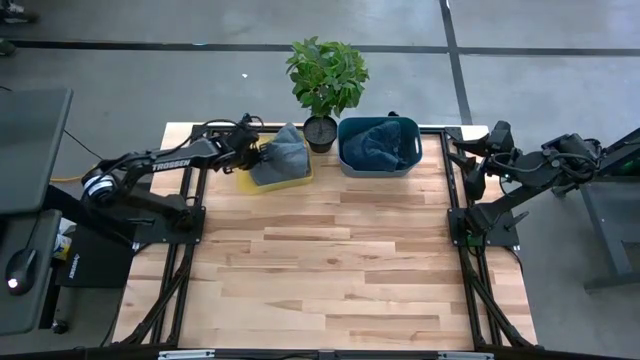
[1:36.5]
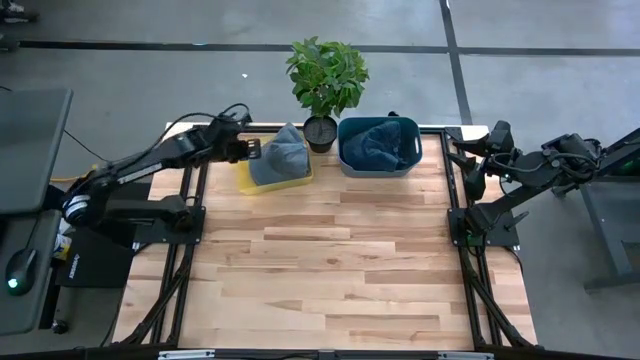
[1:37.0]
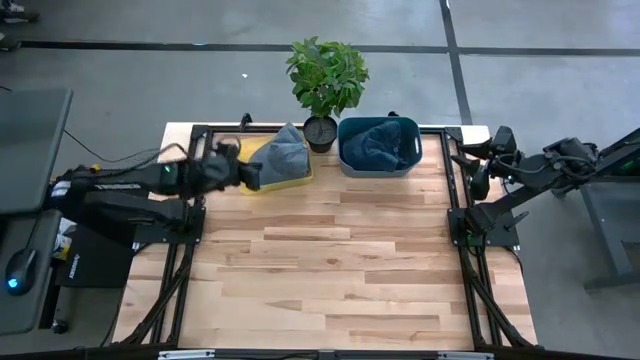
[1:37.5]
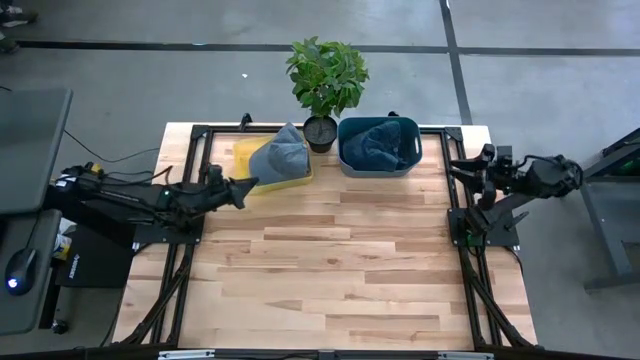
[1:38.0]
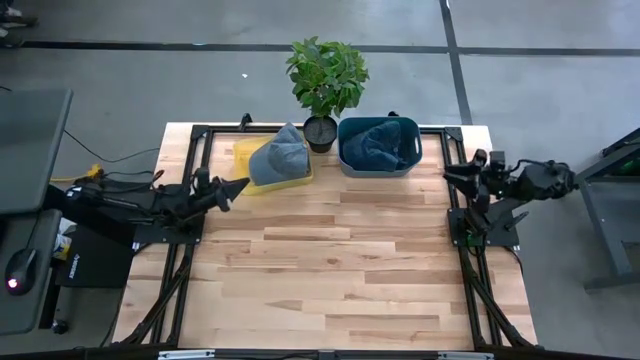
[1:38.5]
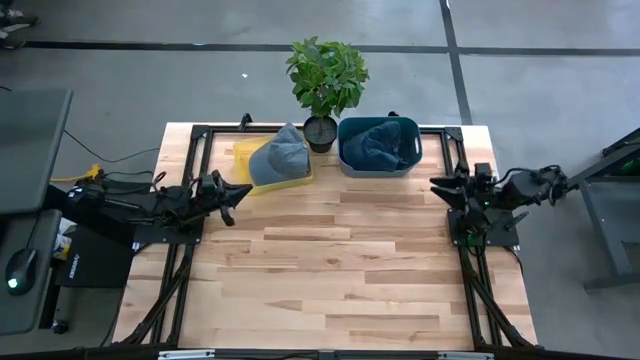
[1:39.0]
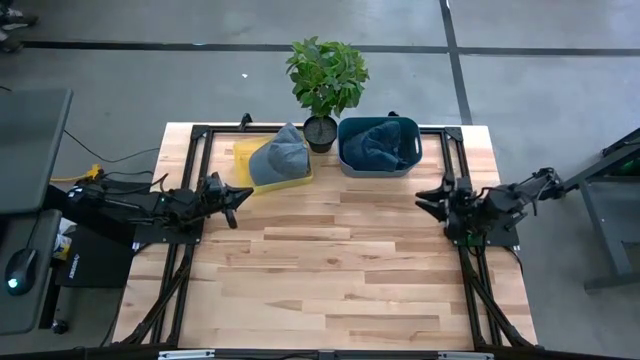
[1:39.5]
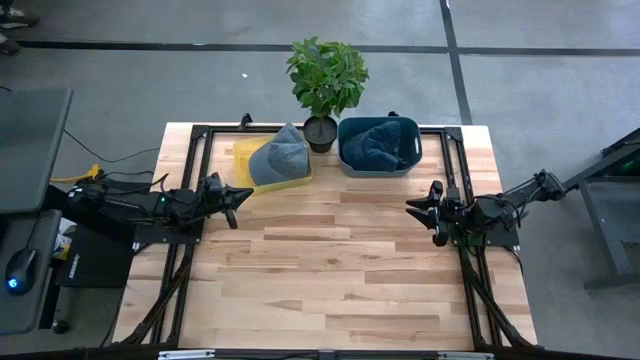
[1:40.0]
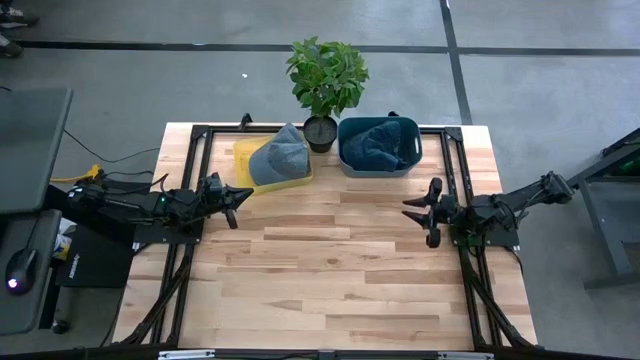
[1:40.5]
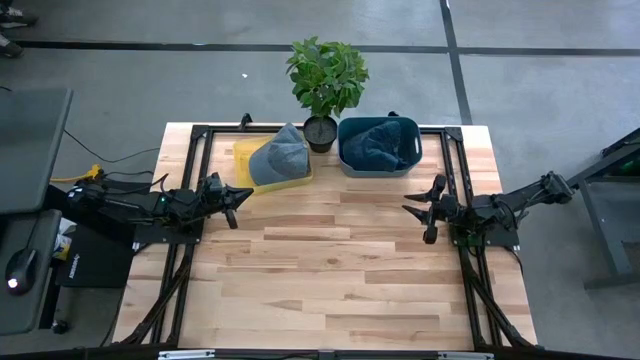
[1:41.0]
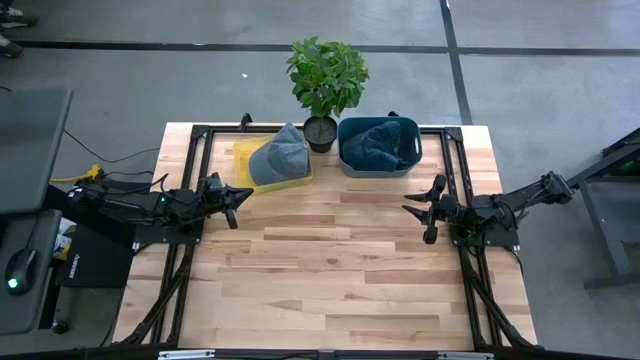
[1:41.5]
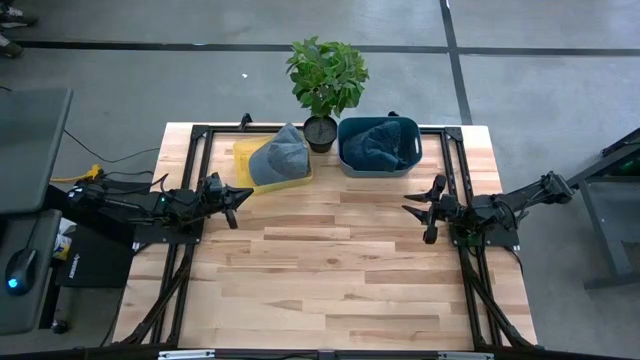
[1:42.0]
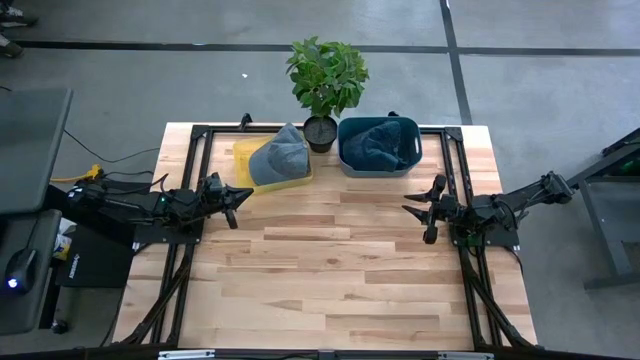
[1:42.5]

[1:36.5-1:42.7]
Task: Pick & Place hat
Return to Home Position

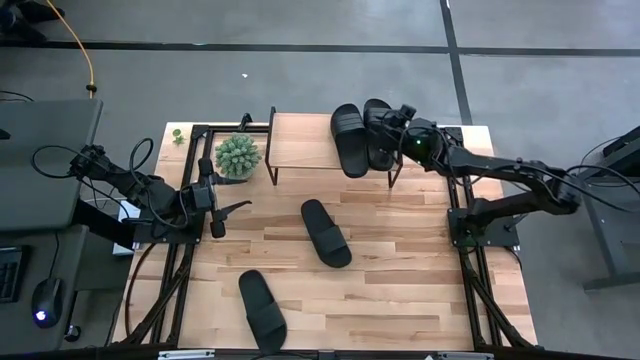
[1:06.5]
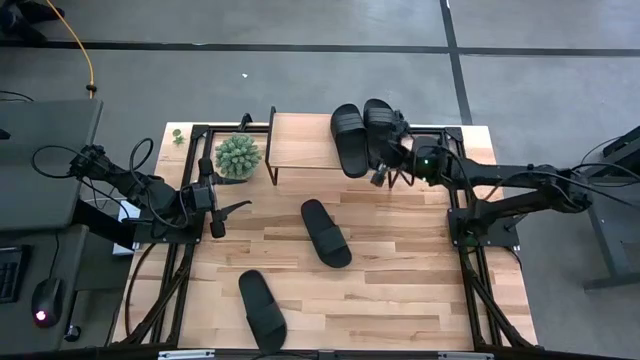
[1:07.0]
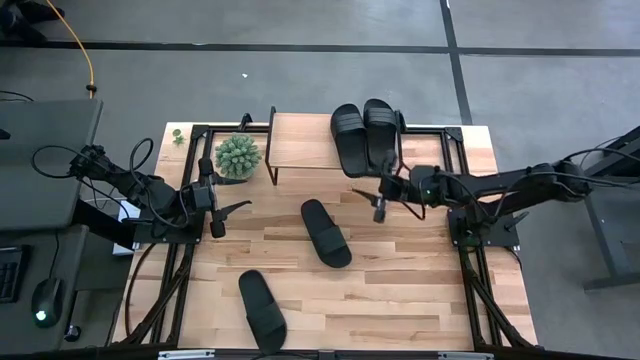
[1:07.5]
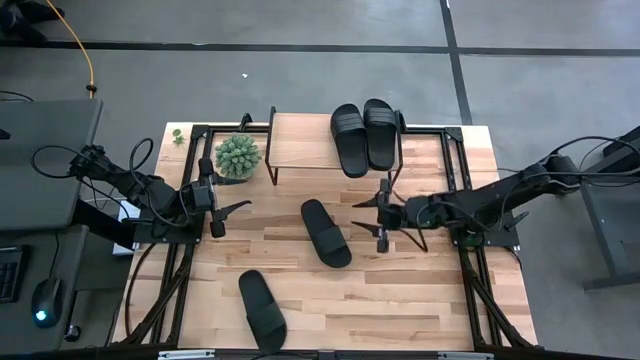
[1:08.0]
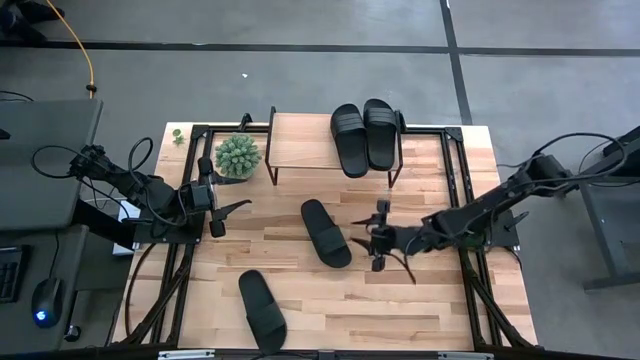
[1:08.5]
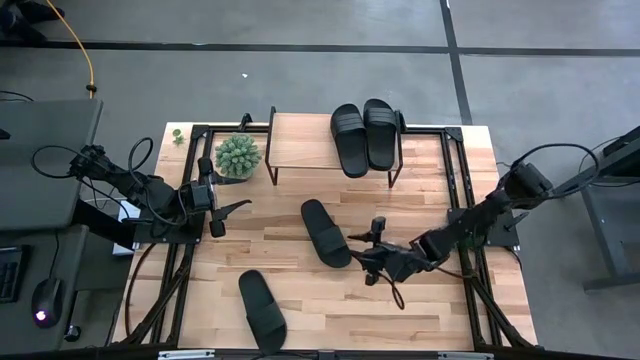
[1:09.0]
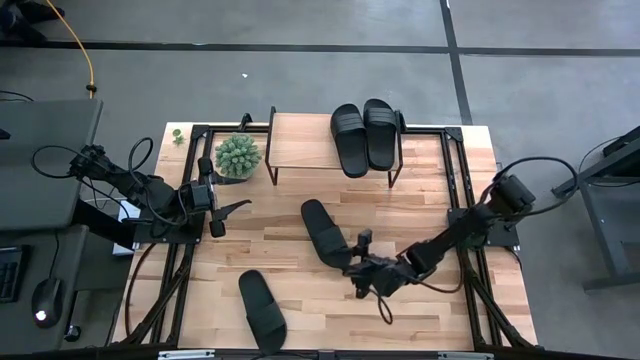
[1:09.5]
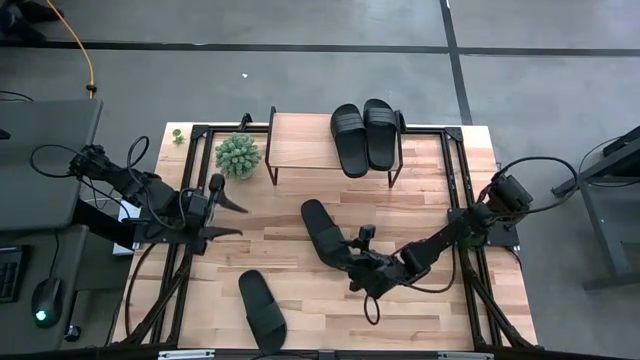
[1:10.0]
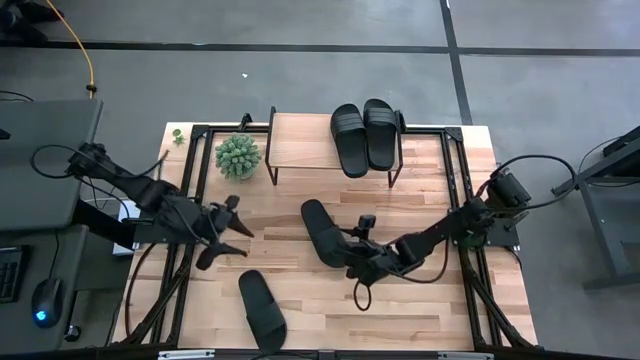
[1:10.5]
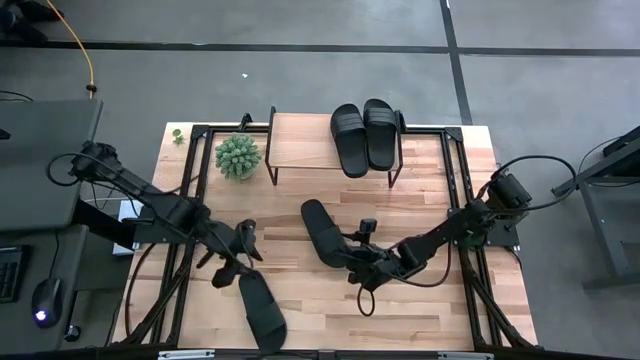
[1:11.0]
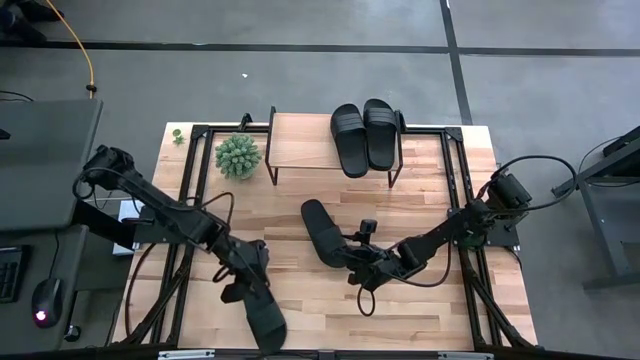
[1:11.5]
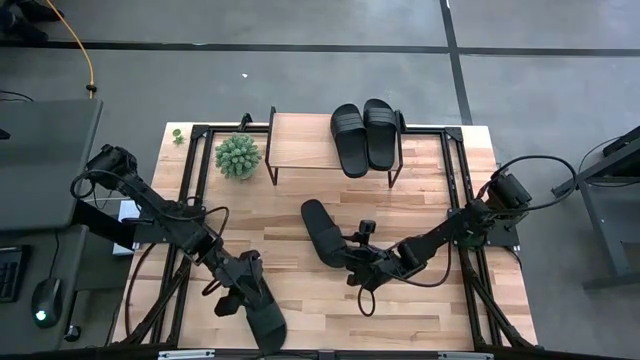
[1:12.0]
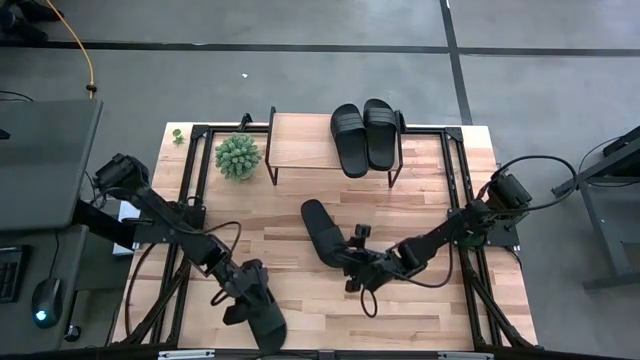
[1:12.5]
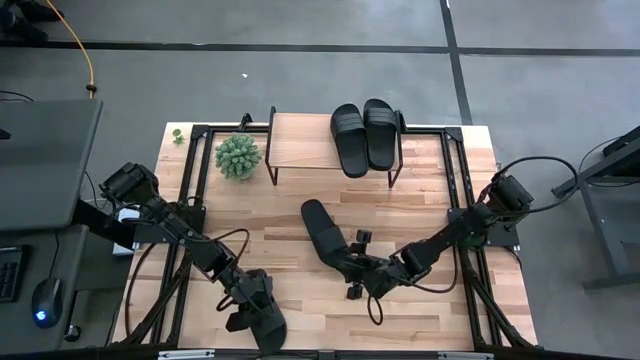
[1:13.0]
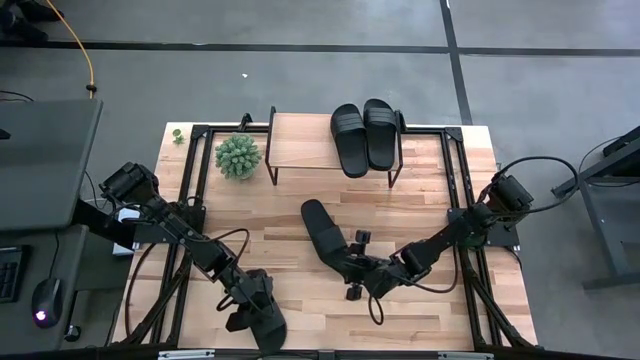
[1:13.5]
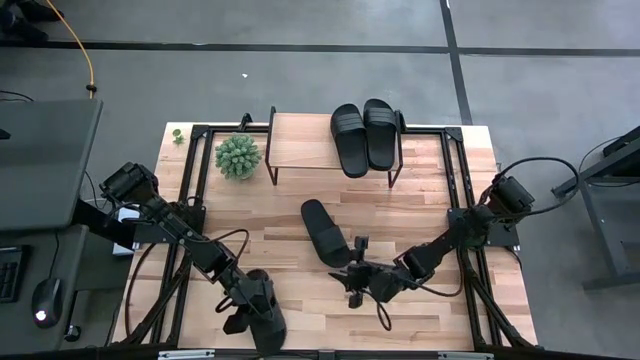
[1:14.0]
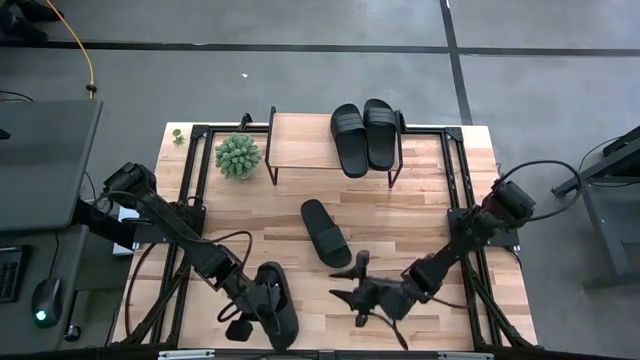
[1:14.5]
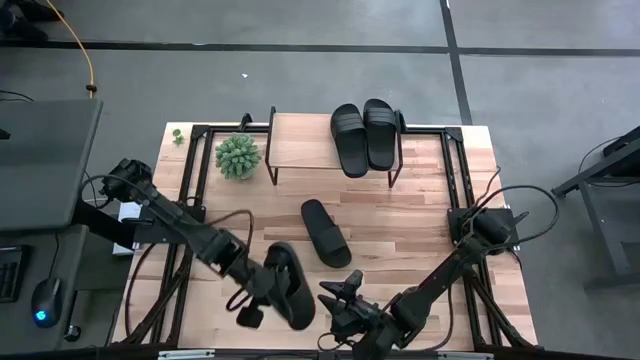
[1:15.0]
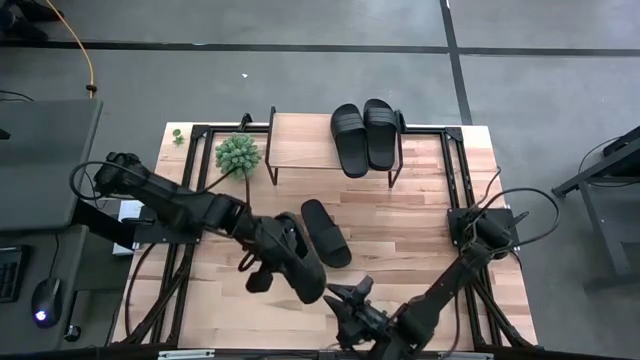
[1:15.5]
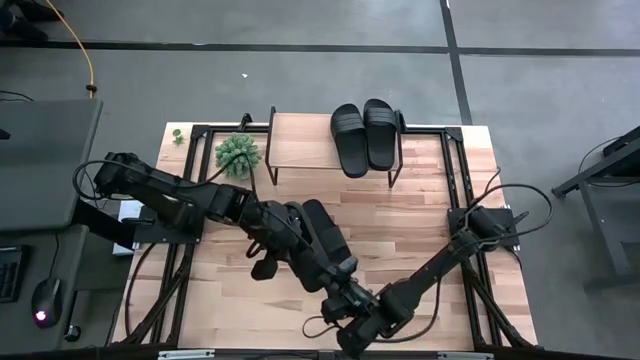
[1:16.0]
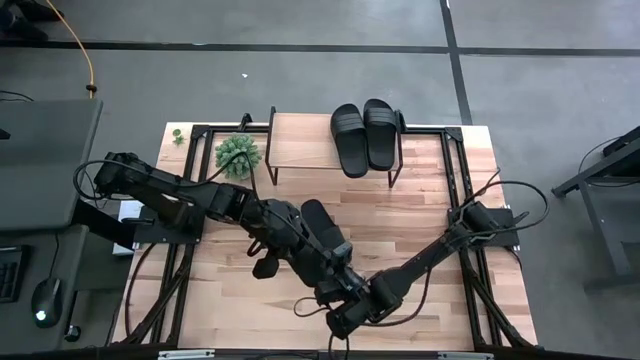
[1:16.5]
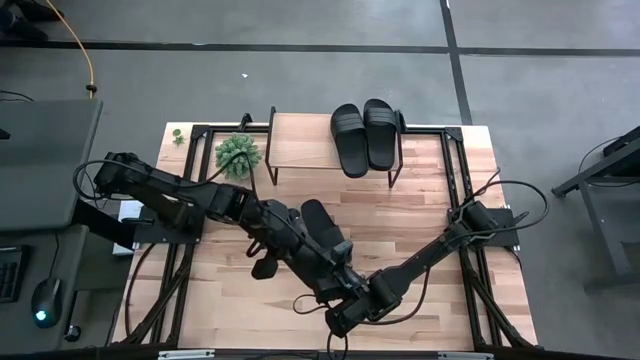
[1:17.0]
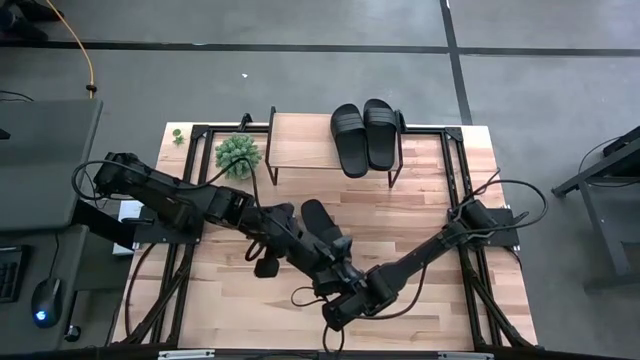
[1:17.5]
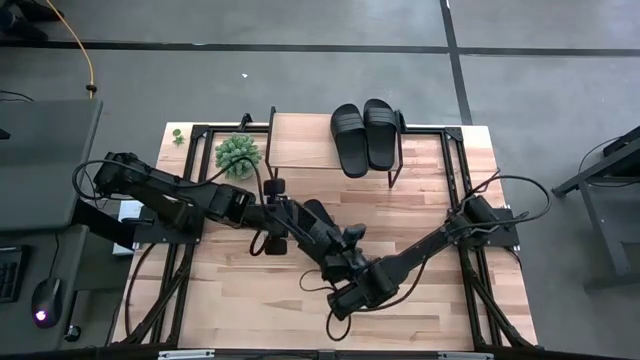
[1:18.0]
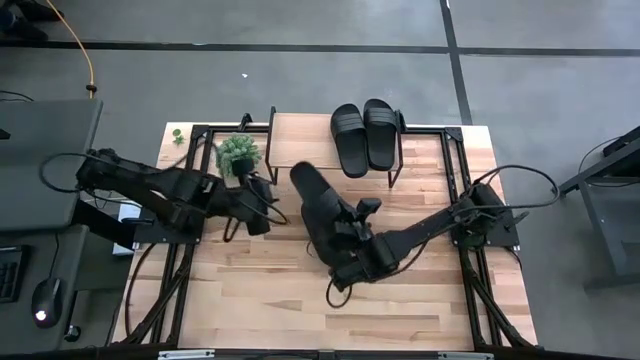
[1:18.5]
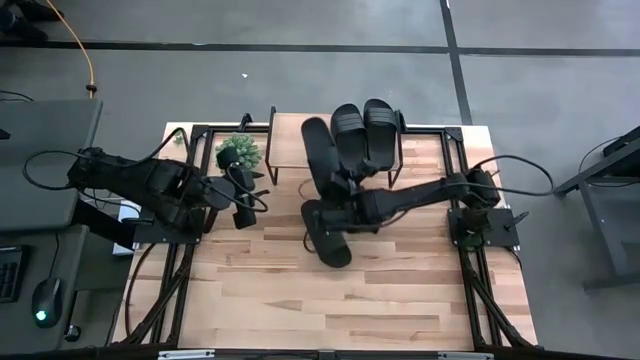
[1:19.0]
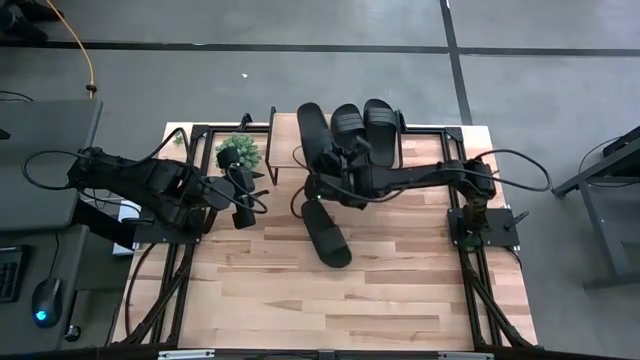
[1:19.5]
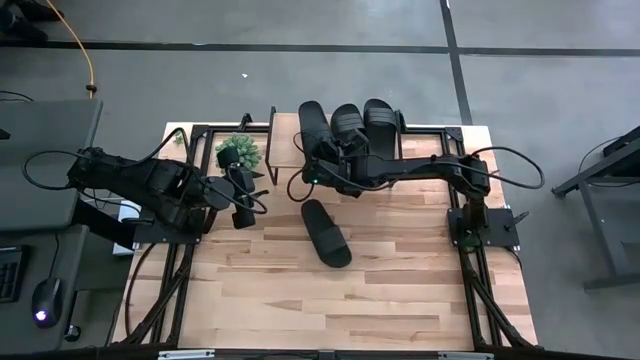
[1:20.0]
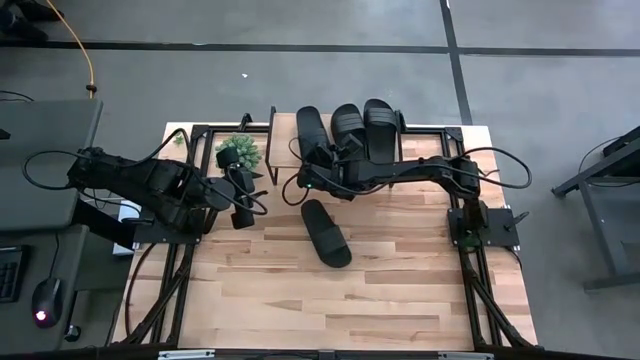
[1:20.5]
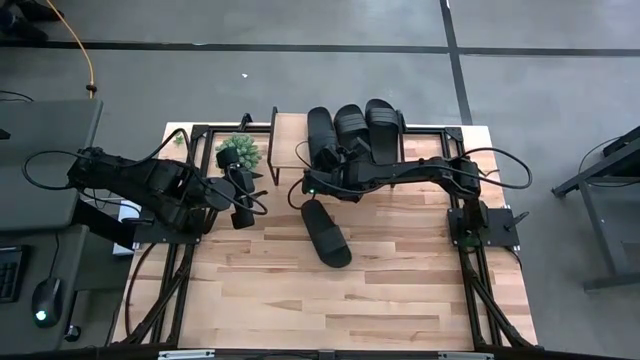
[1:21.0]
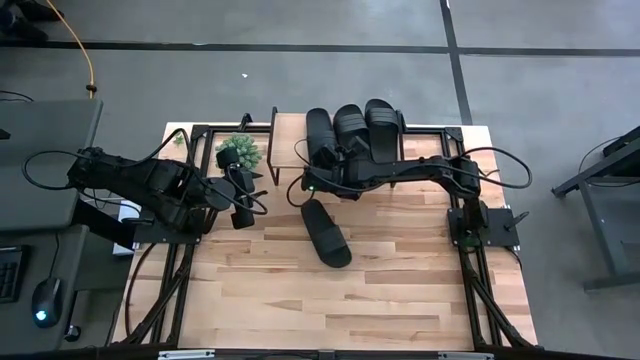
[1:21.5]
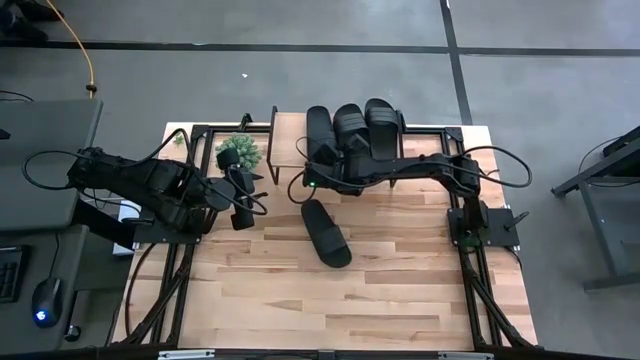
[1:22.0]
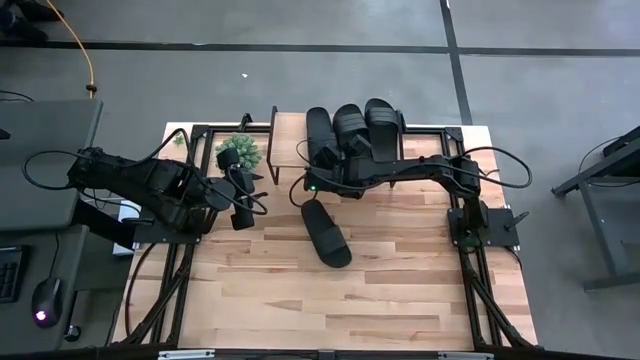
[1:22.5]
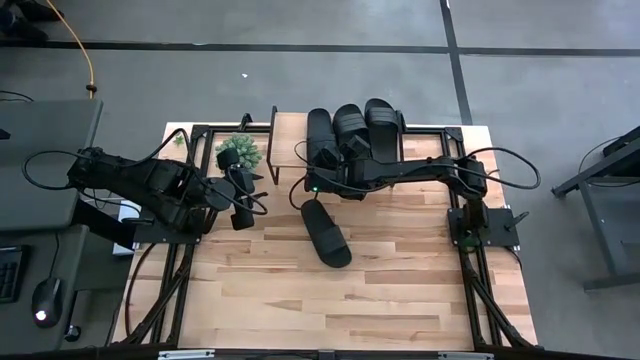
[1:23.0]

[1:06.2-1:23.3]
Task: Pick and place slides into the shelf
Put the black slide on the shelf
